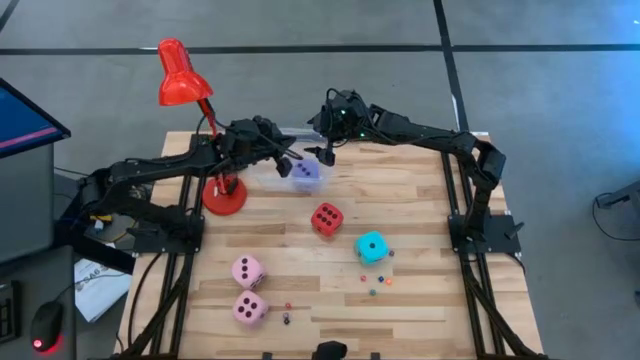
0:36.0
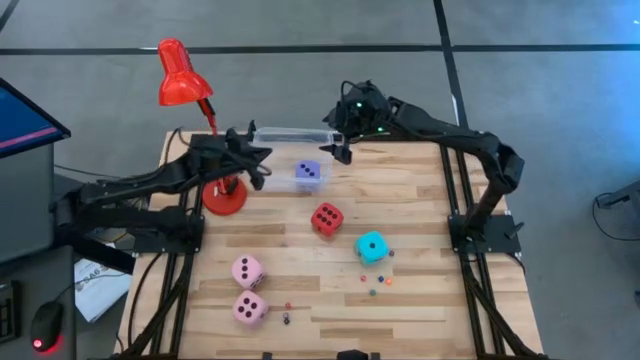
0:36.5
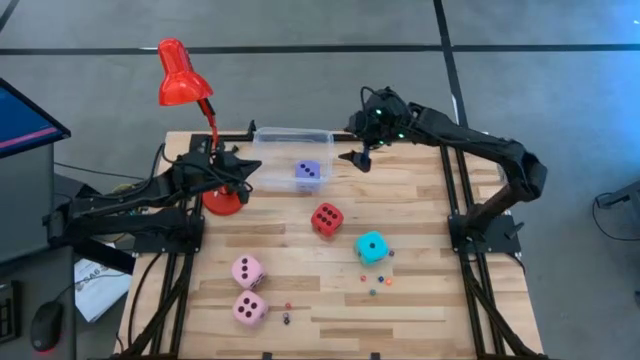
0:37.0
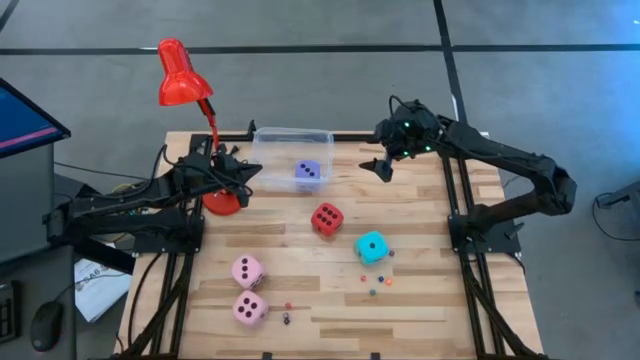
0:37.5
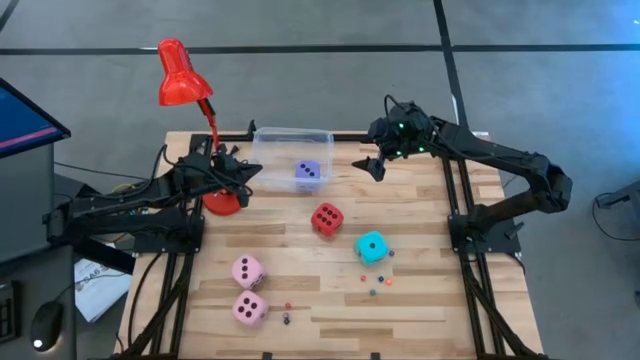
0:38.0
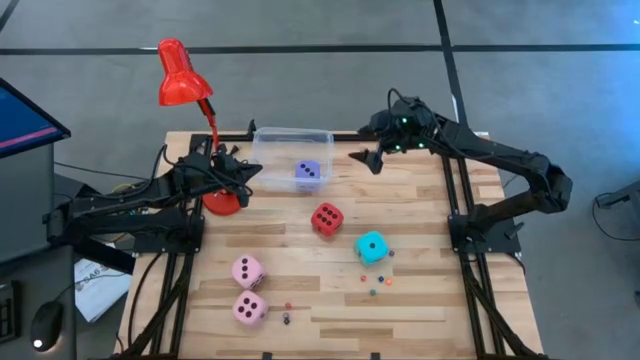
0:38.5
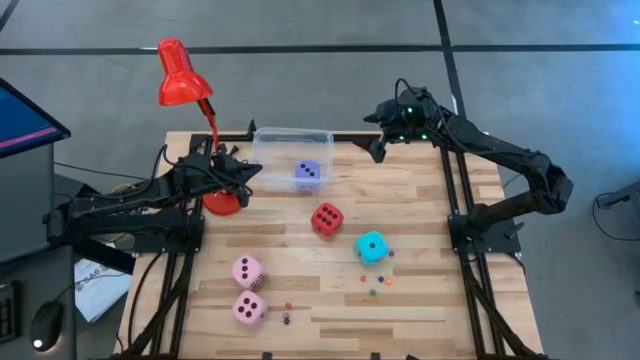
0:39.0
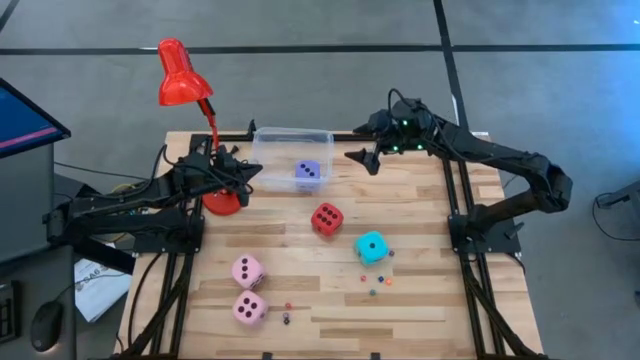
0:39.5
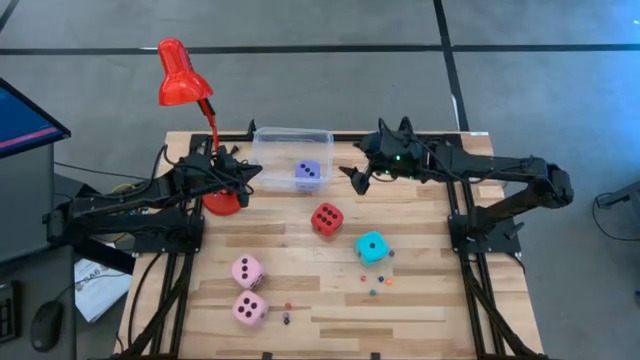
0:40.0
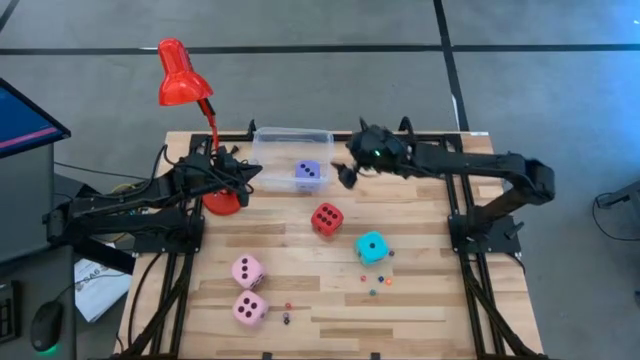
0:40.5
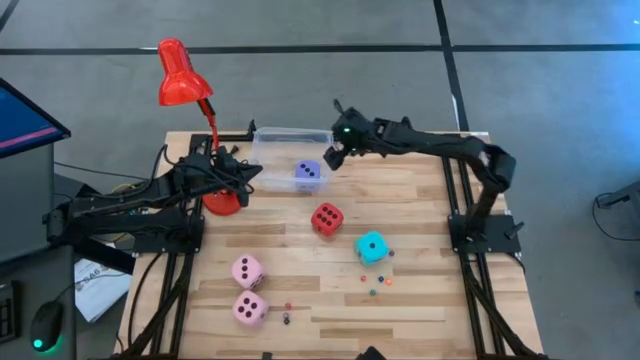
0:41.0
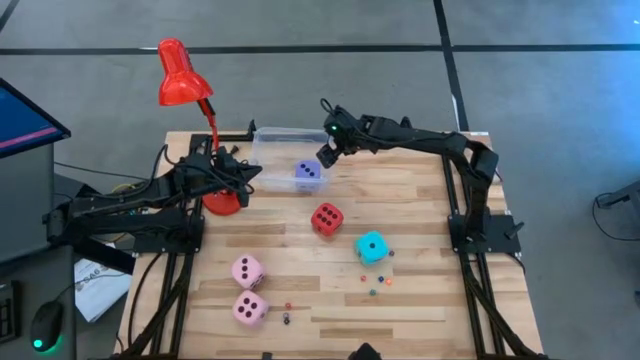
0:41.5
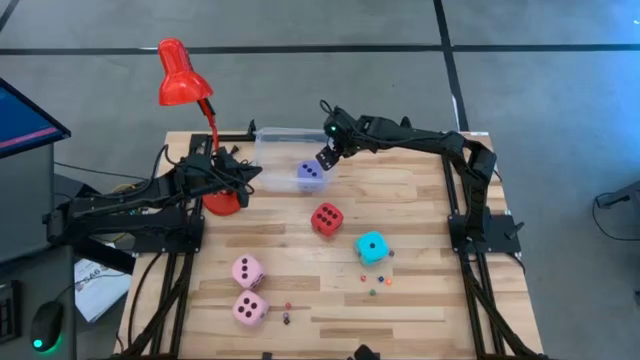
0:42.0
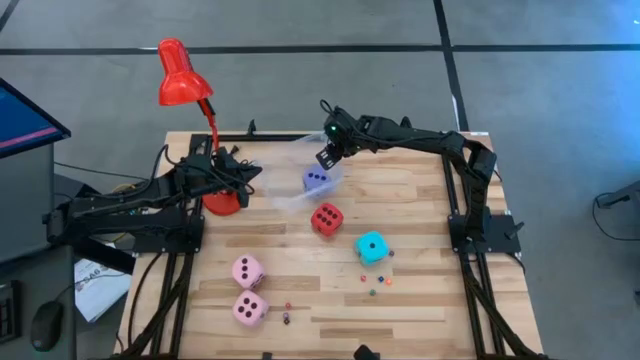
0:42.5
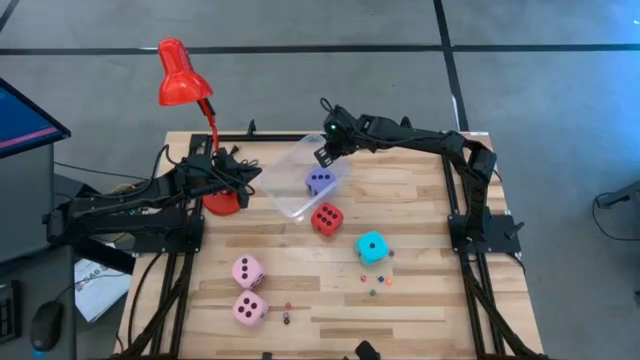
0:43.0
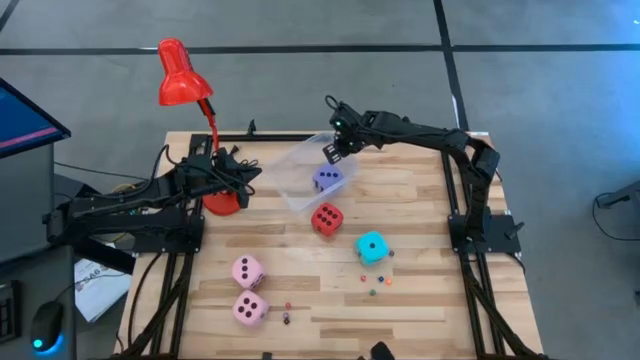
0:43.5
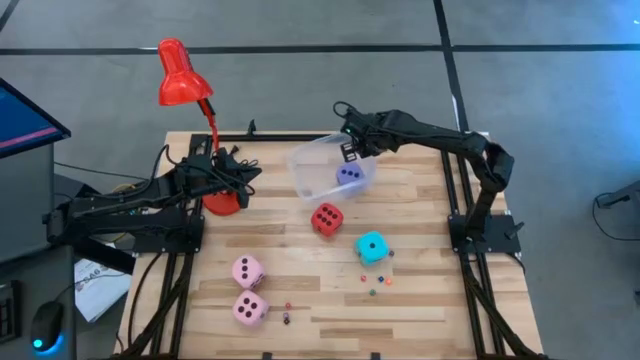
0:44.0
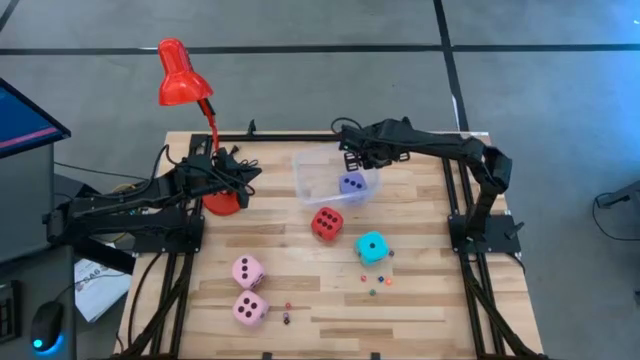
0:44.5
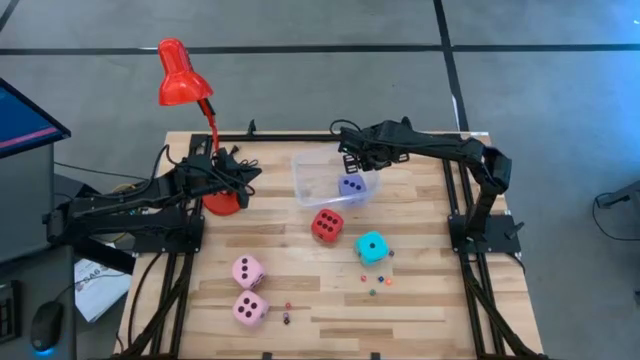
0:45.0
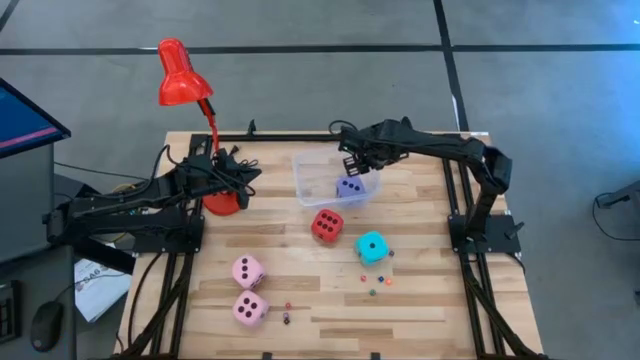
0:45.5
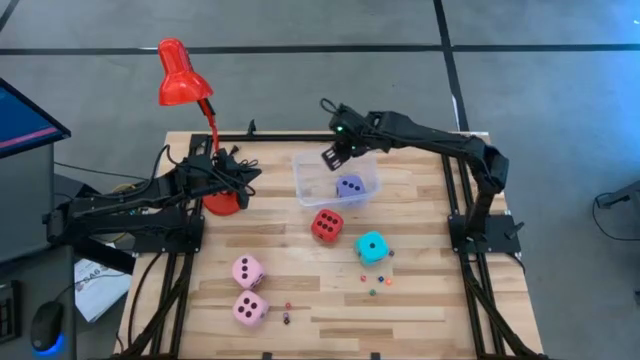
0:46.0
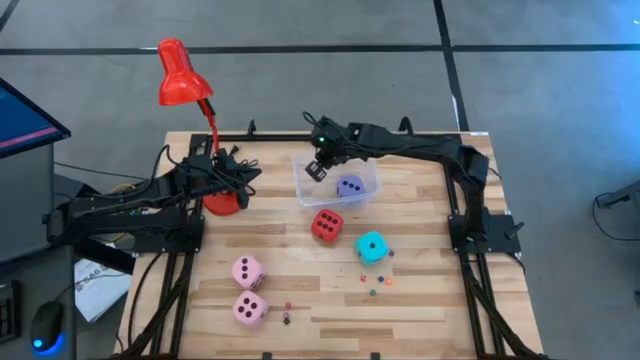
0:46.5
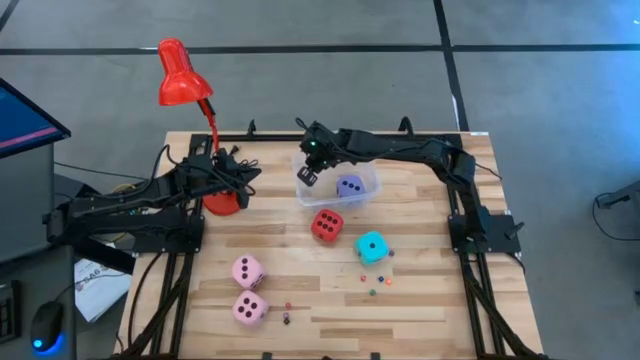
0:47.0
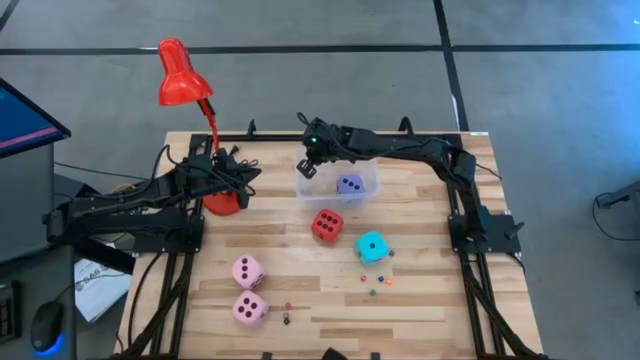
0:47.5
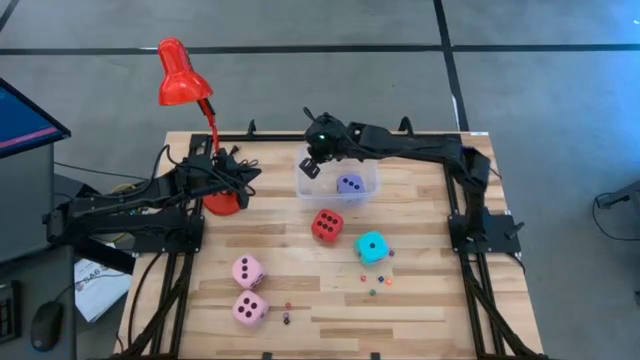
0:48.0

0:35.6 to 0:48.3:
Task: Pick & Place Dice
Move the transparent bin

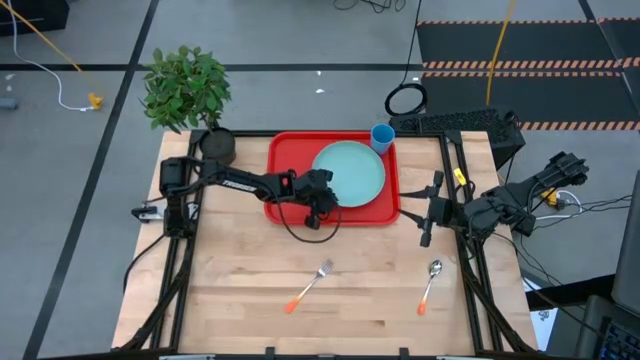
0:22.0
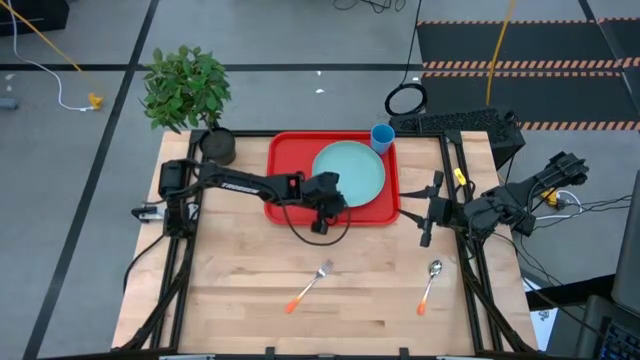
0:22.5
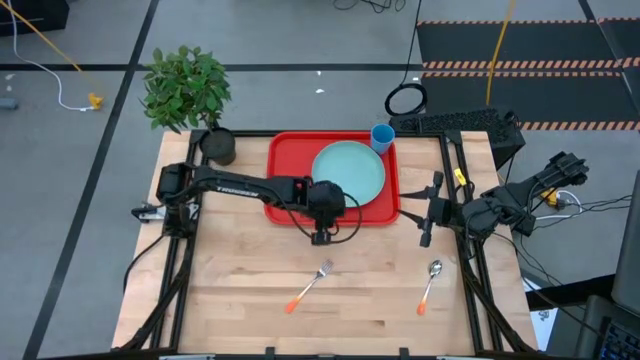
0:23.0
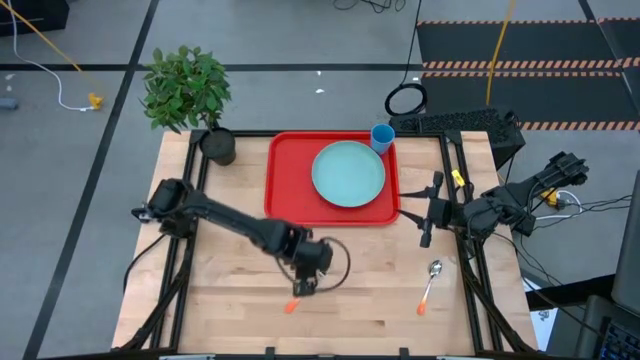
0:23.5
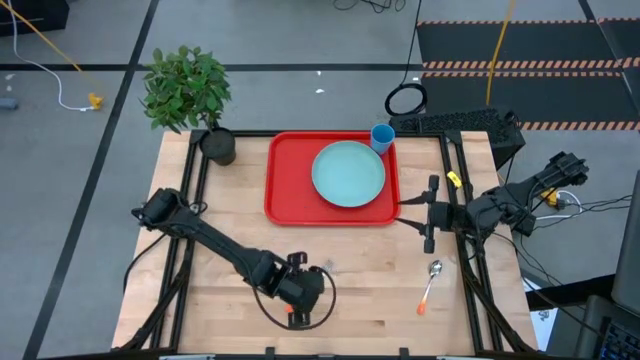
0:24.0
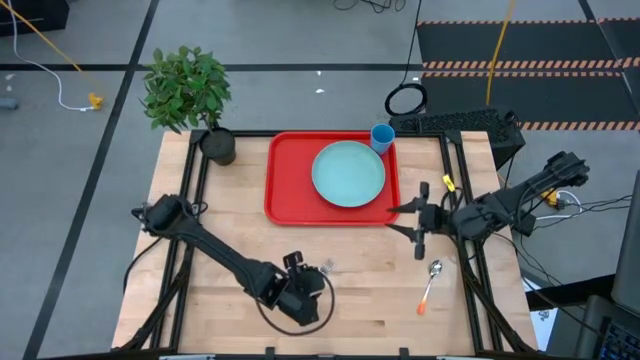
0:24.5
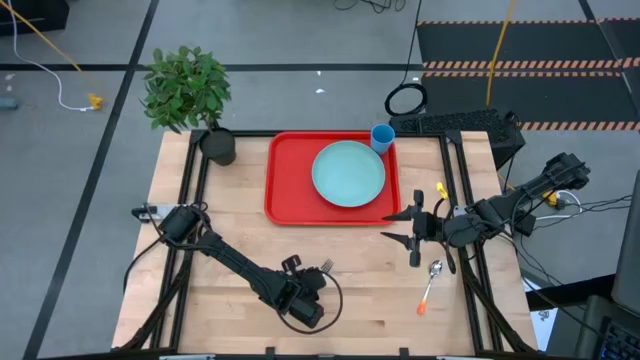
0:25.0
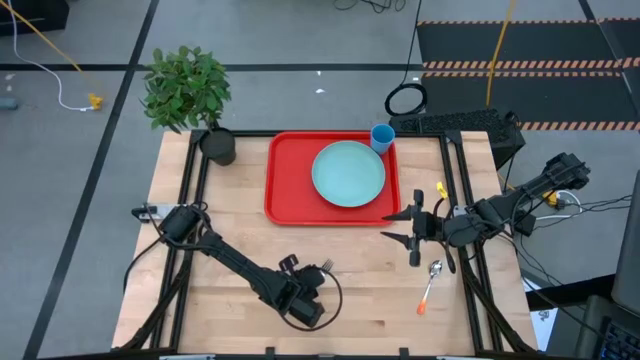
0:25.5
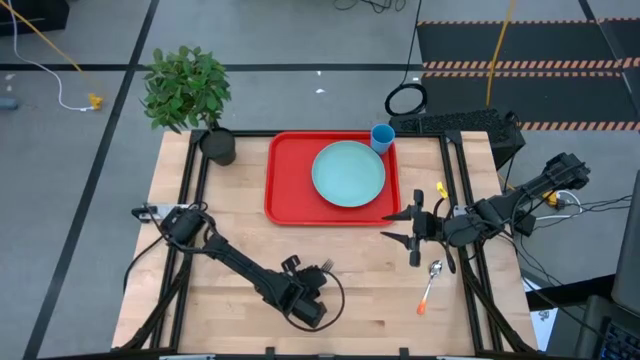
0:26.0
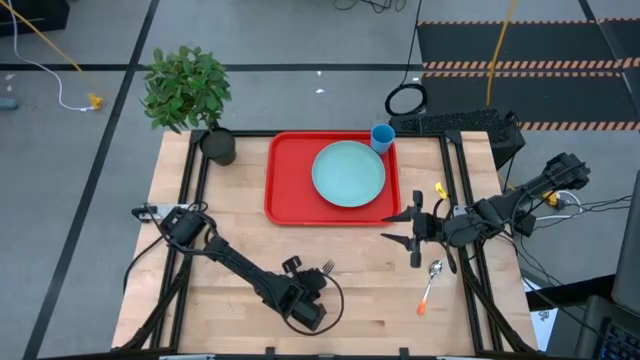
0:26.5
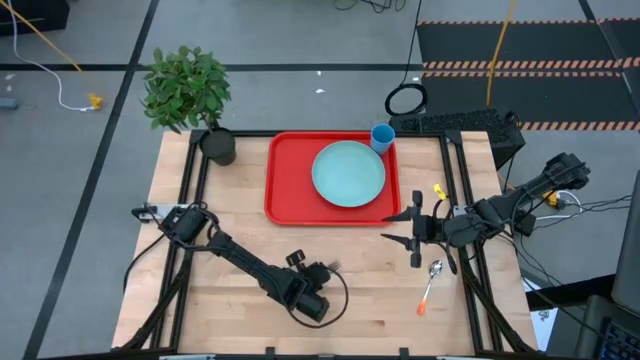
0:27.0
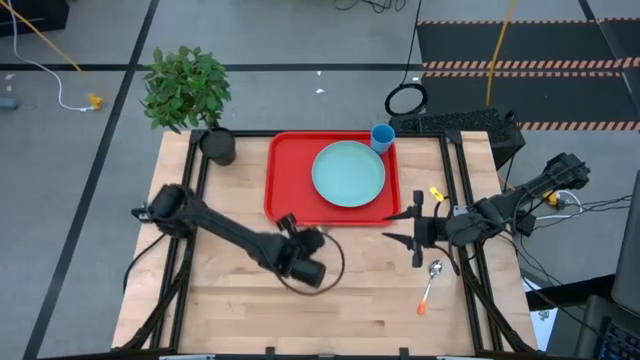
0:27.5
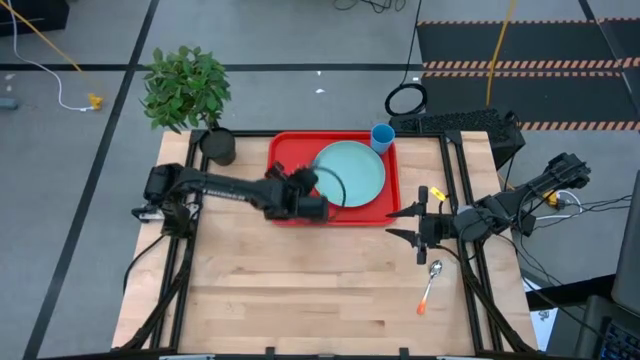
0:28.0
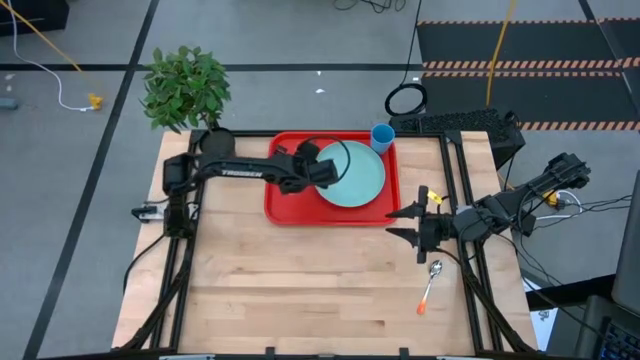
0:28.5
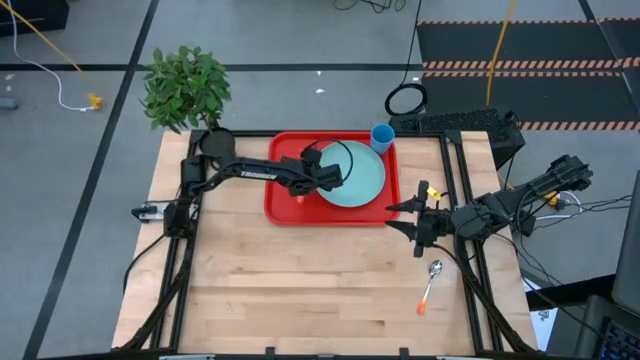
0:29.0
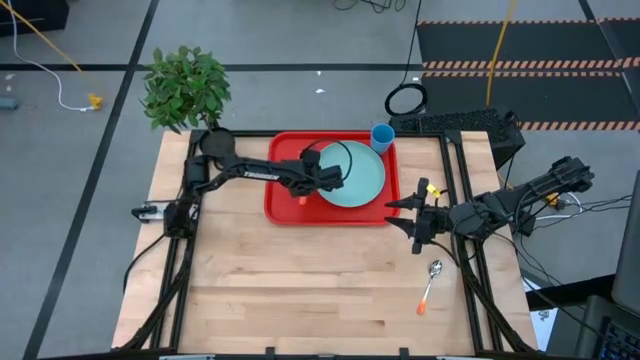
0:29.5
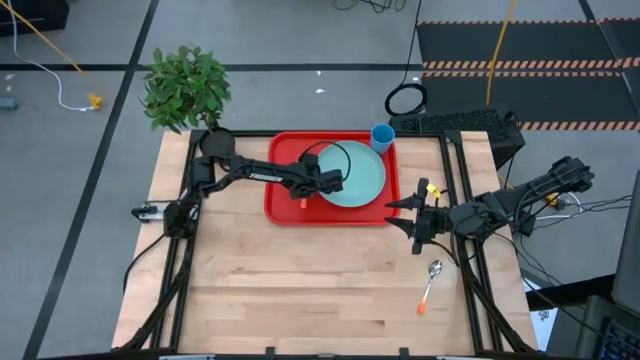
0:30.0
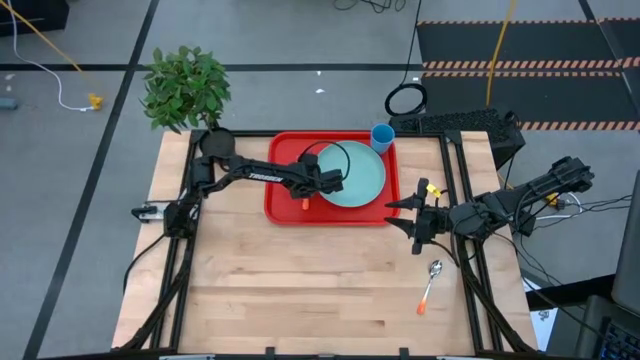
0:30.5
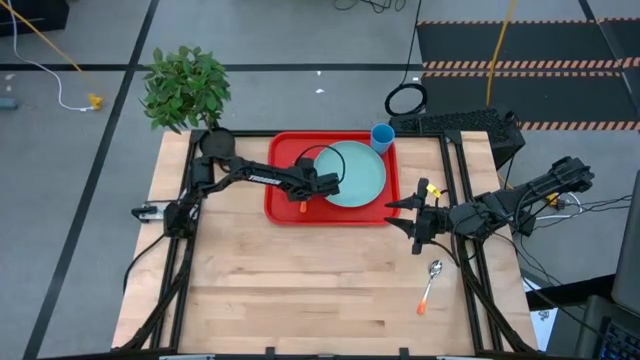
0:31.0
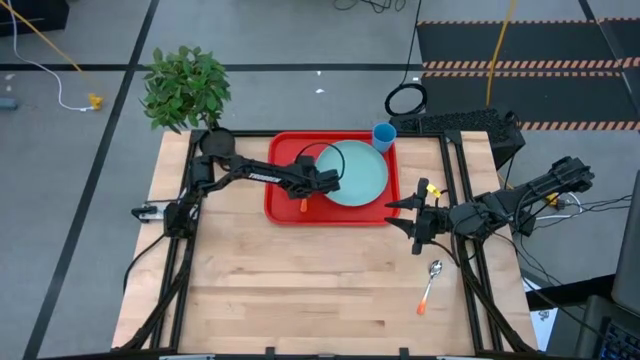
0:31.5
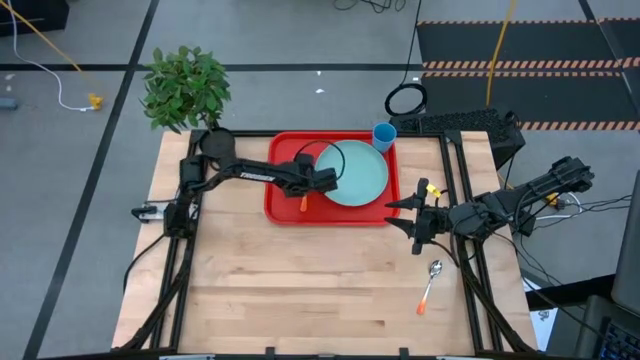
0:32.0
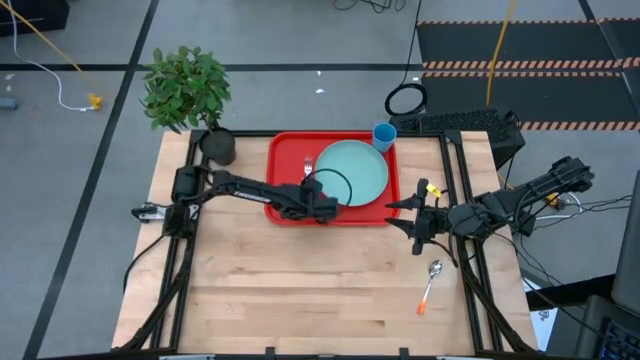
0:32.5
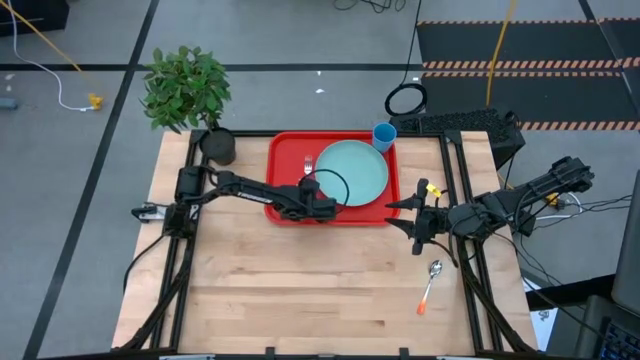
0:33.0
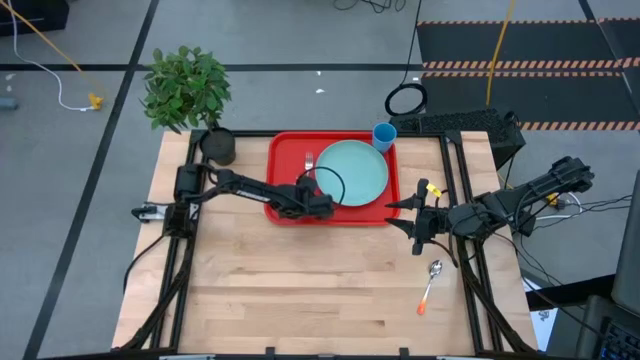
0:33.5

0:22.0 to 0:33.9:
Task: Pick and place plate/cup/fork/spoon on tray
Put the orange fork on the orange serving tray to the left of the blue plate
